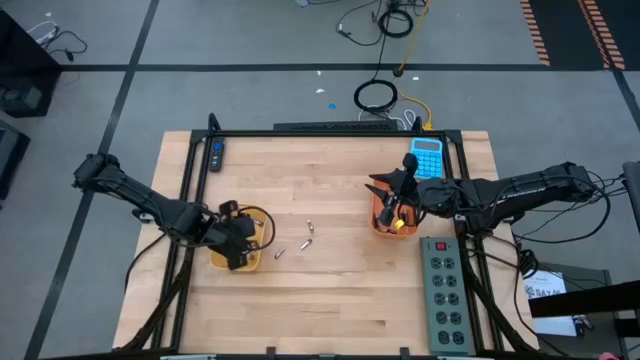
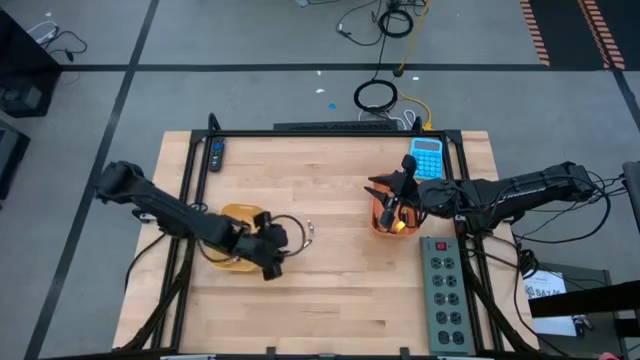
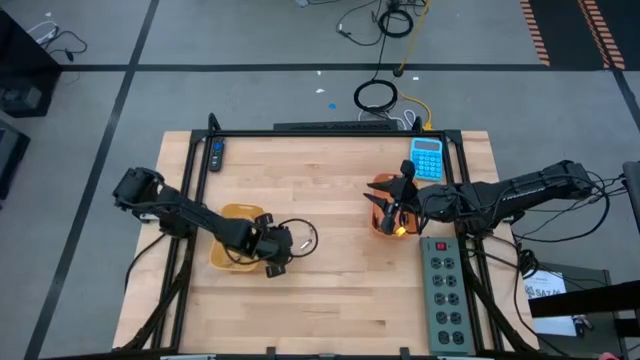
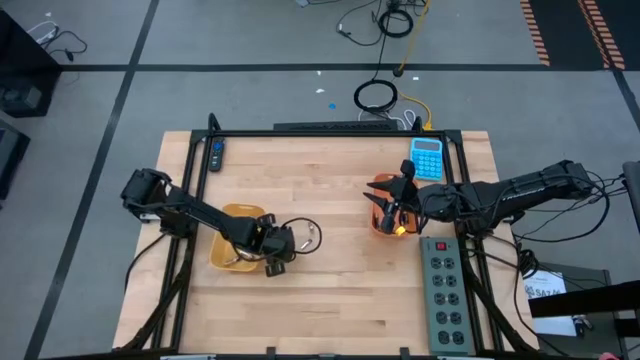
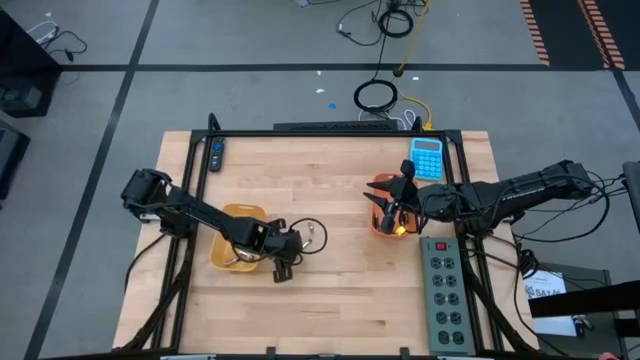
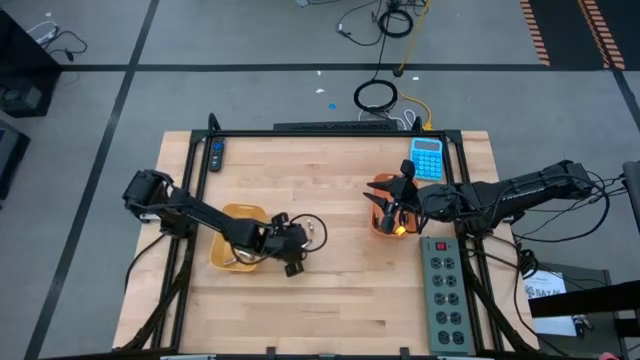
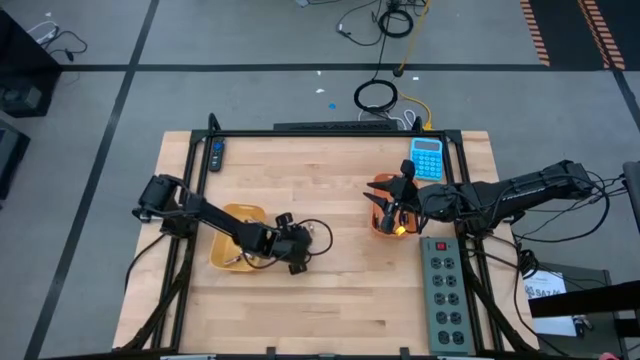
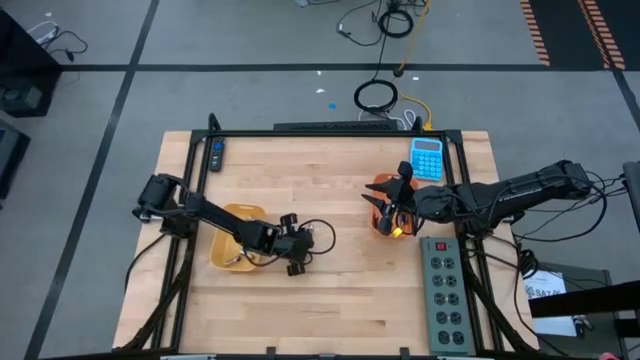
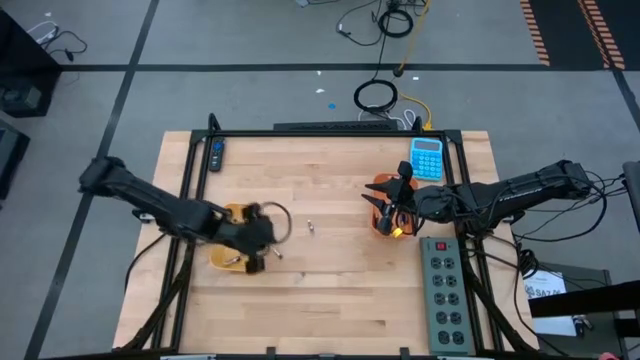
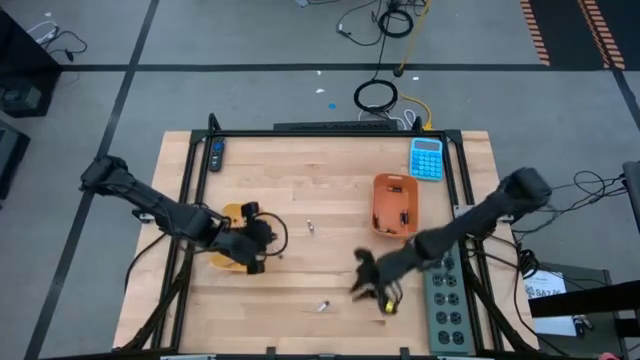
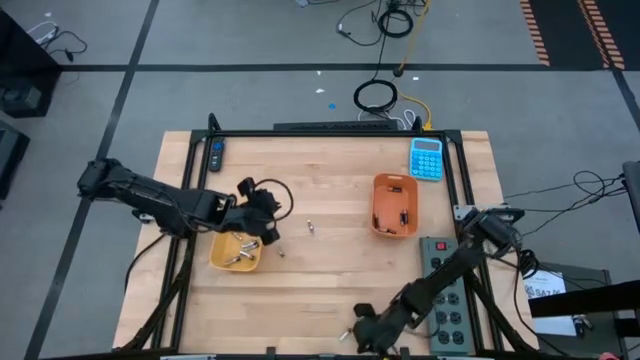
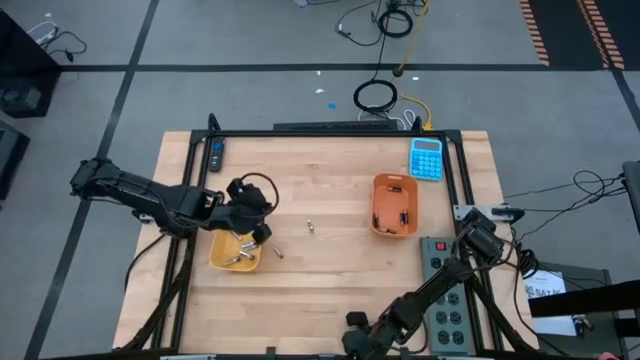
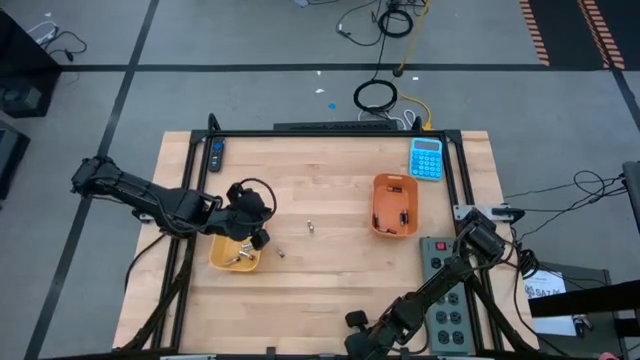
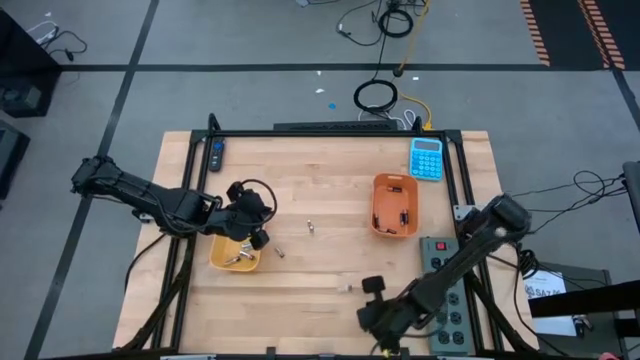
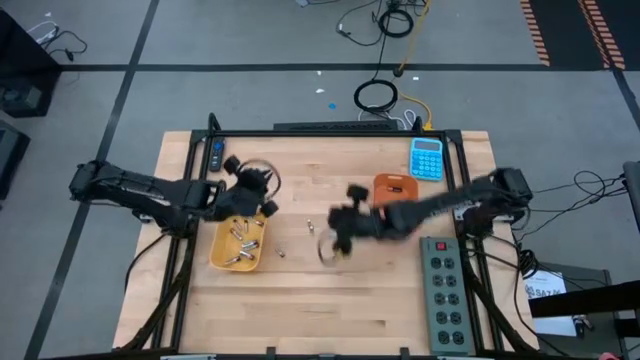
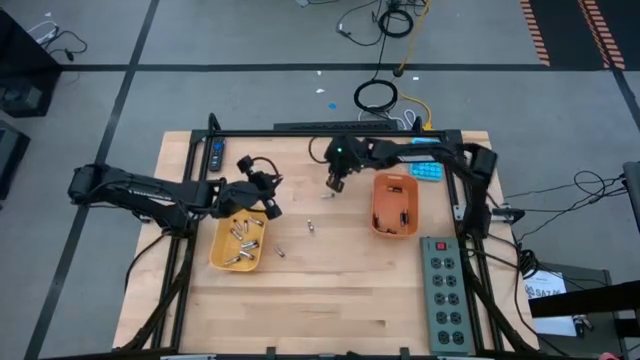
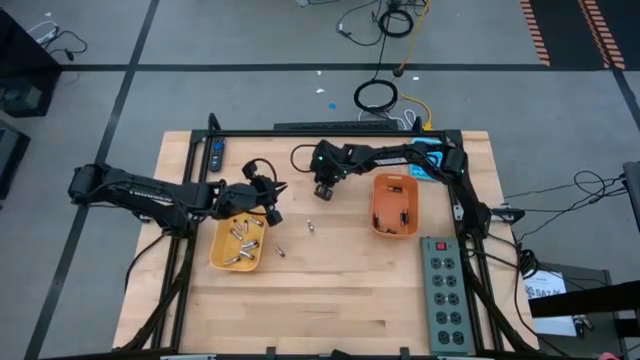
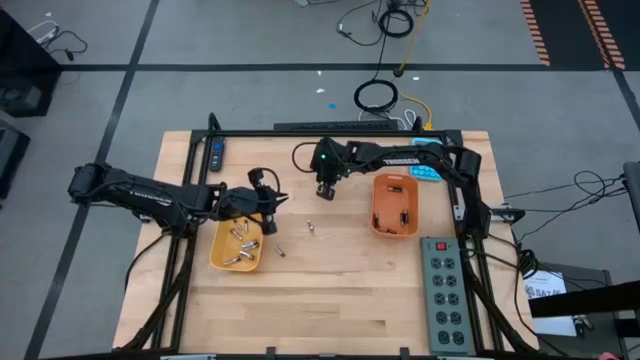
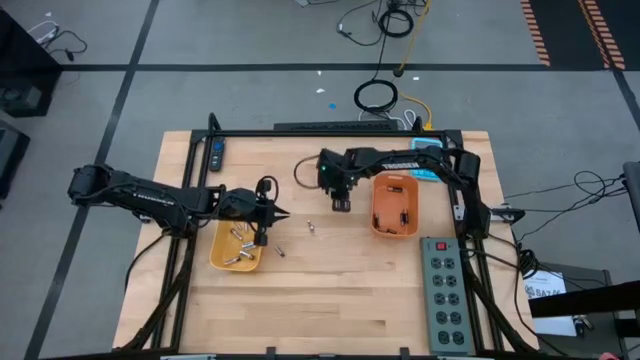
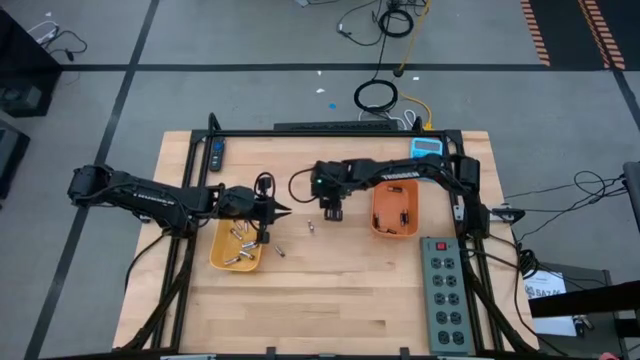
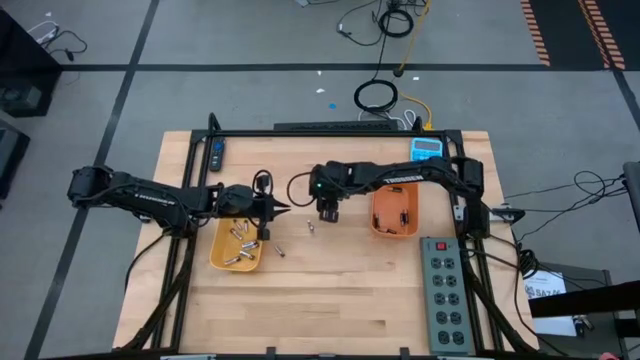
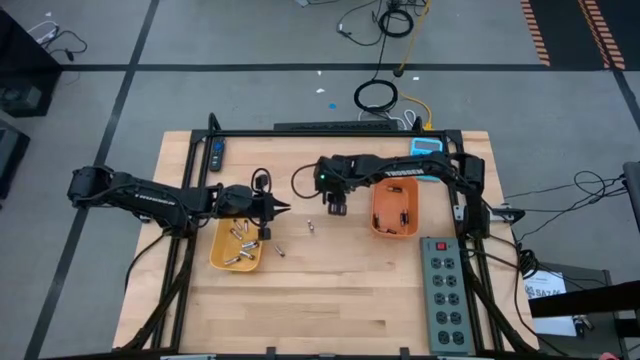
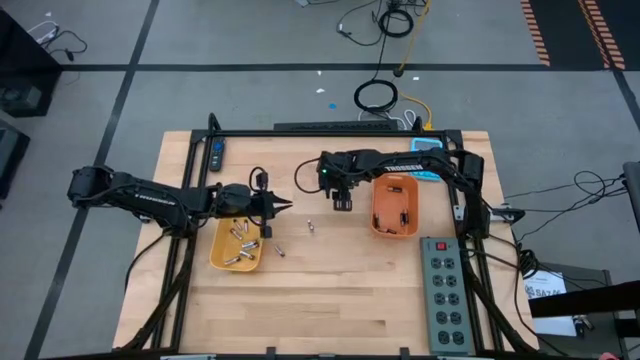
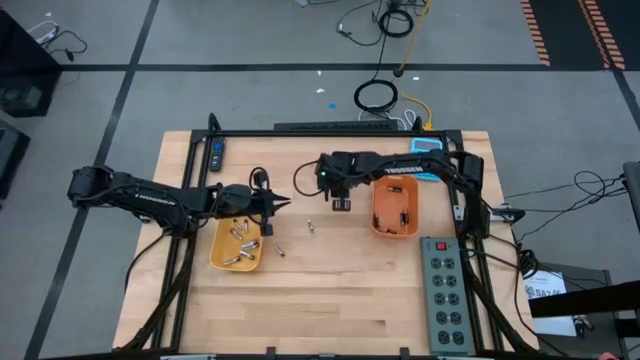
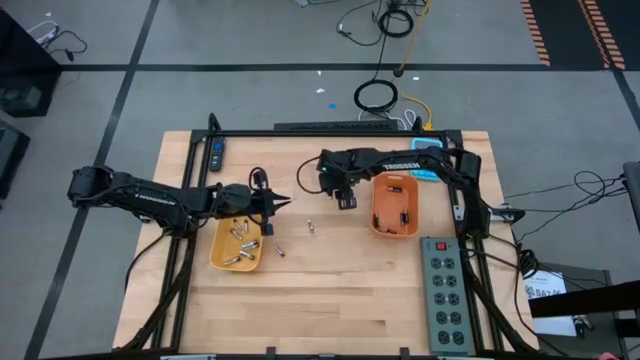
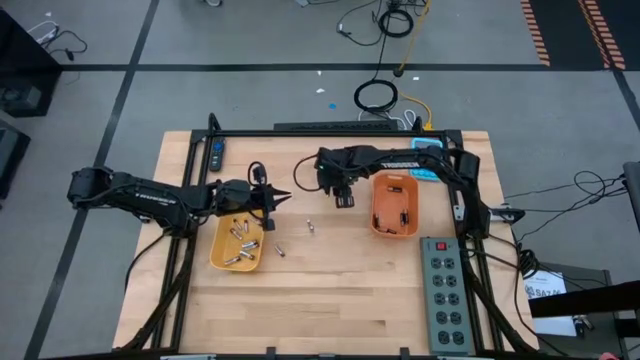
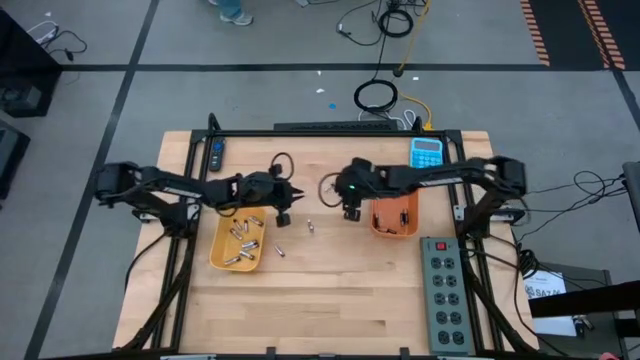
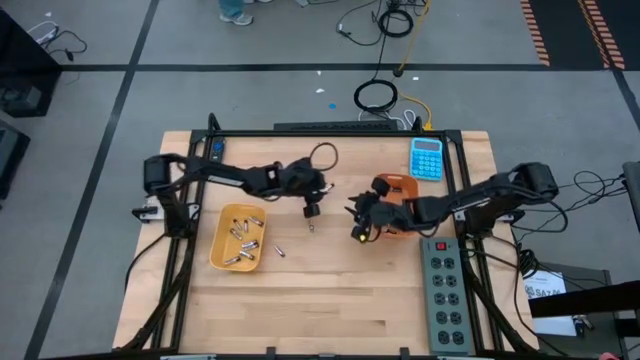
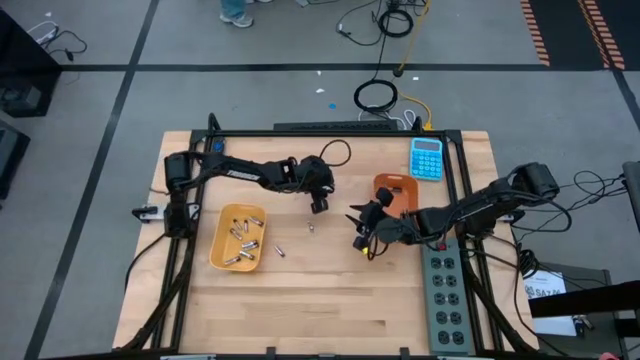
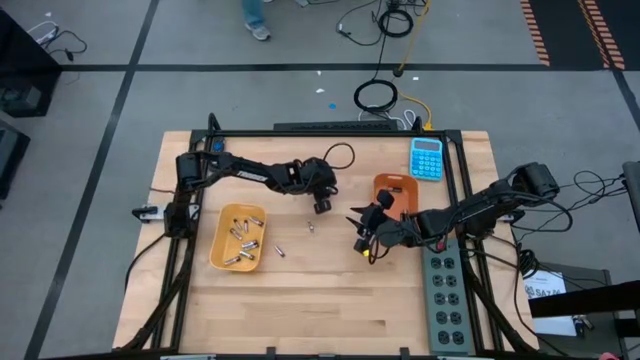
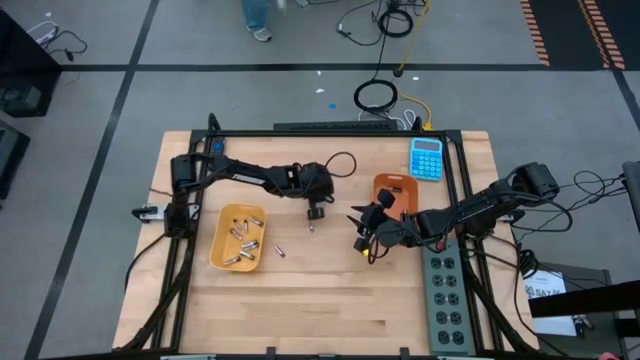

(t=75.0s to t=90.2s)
Task: Sort batteries
Put the silver battery into the yellow bin

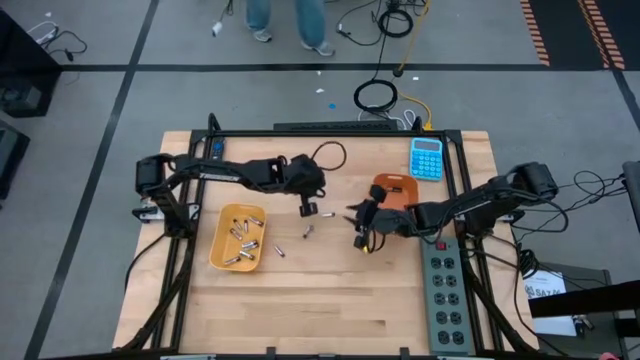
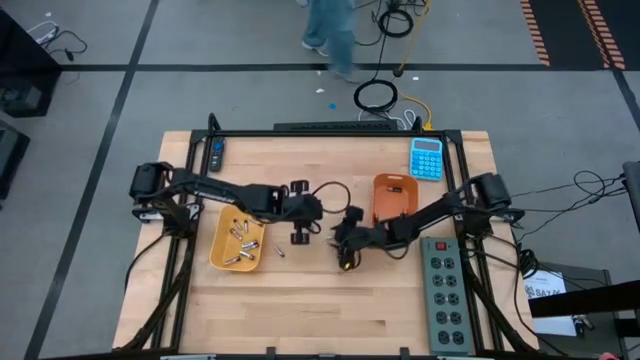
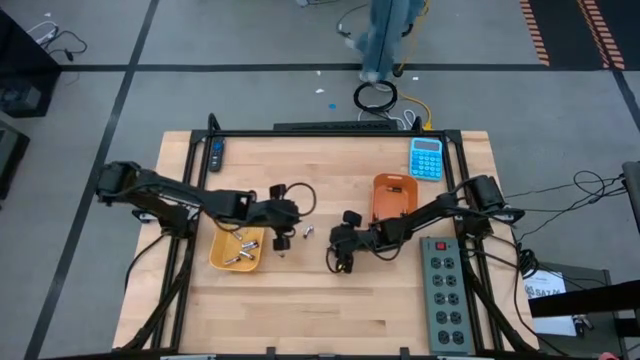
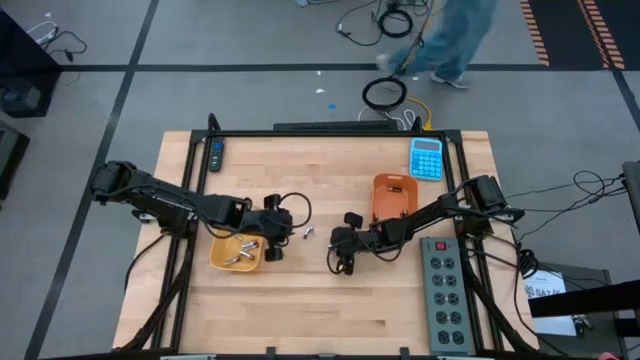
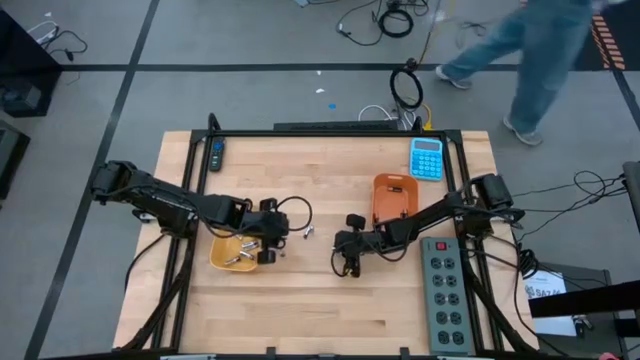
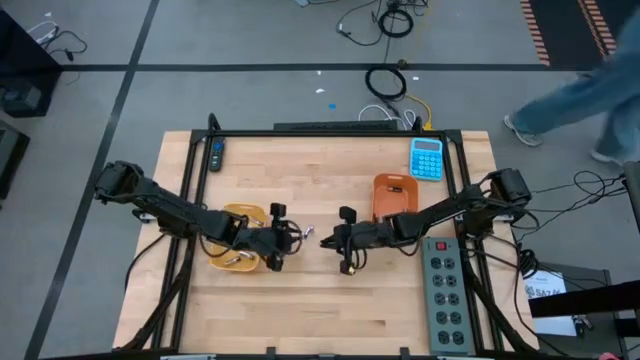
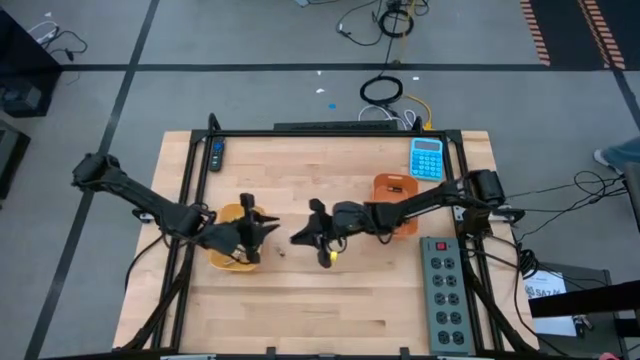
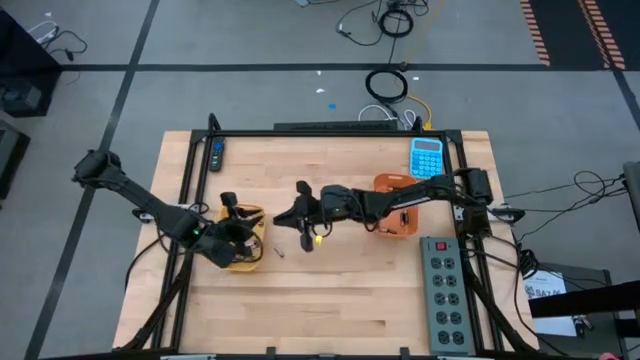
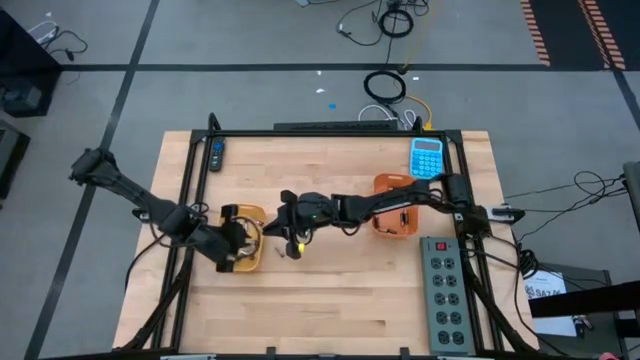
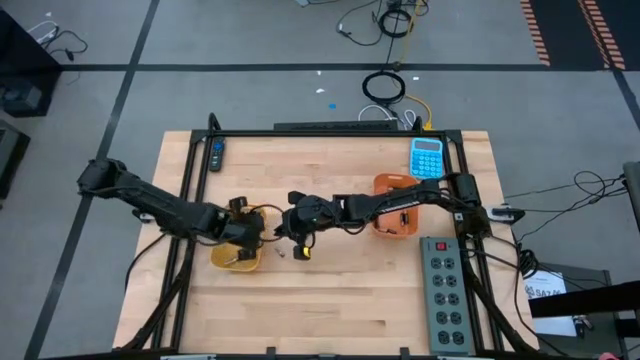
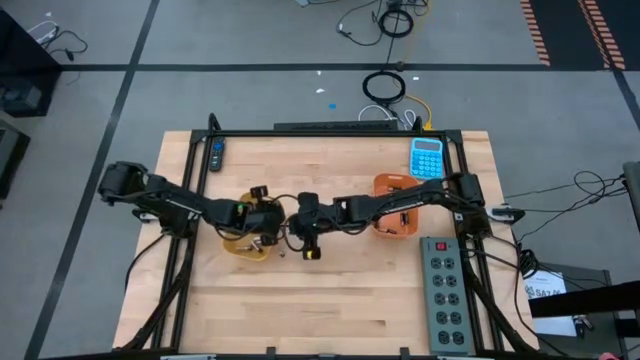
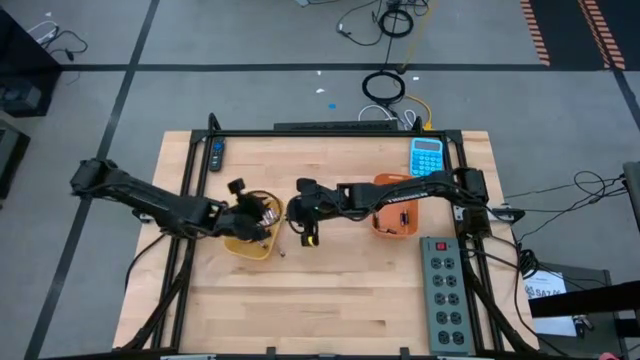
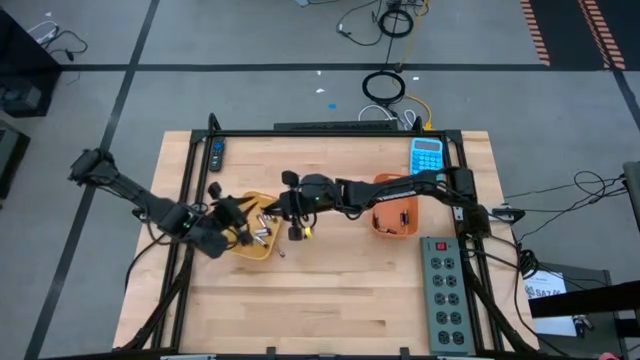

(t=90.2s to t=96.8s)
Put the silver battery into the yellow bin
